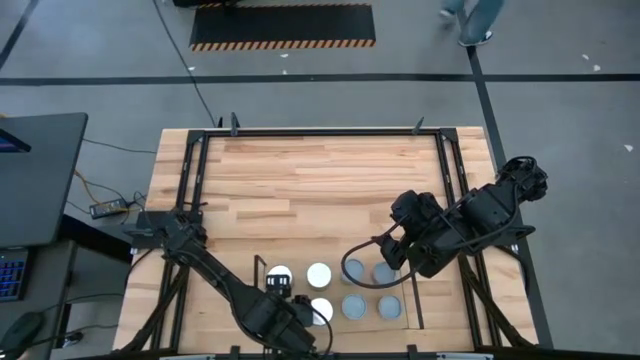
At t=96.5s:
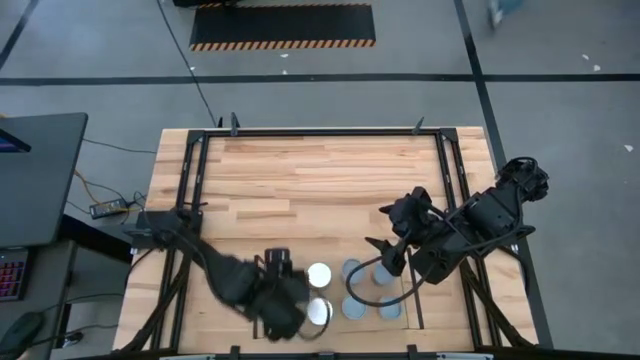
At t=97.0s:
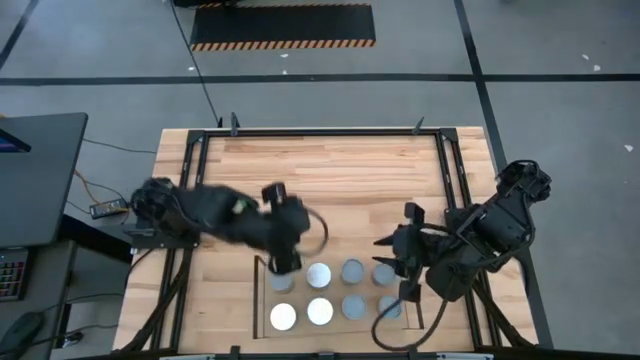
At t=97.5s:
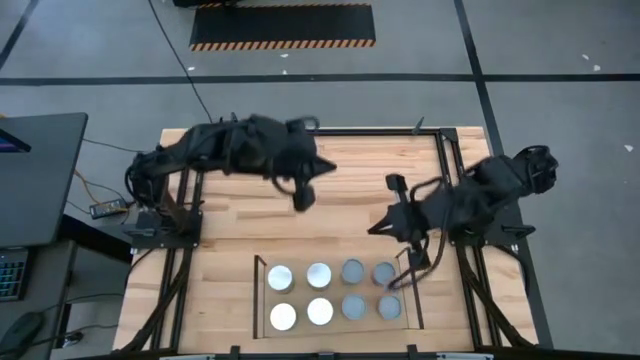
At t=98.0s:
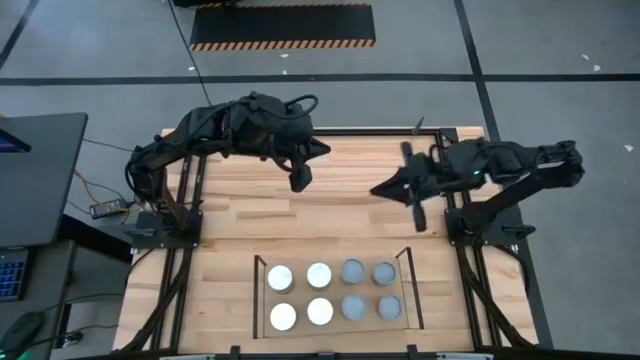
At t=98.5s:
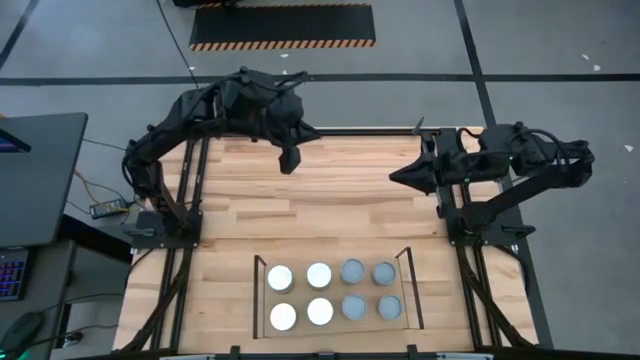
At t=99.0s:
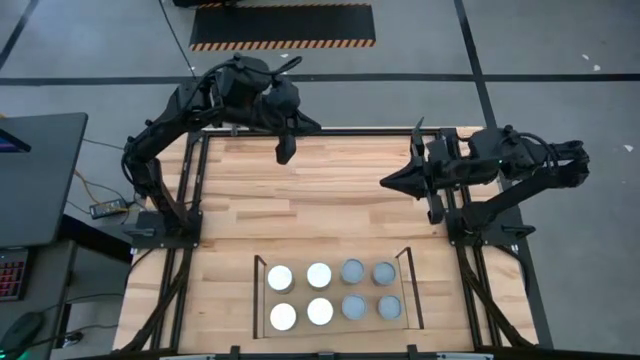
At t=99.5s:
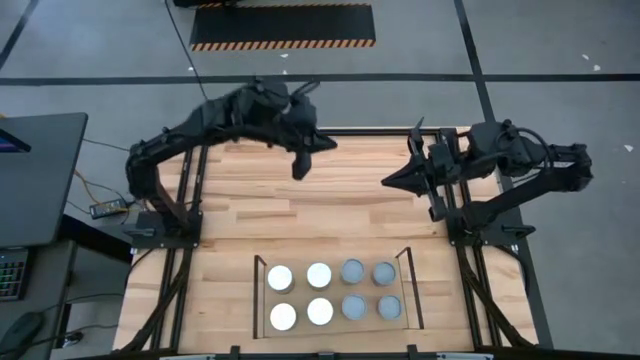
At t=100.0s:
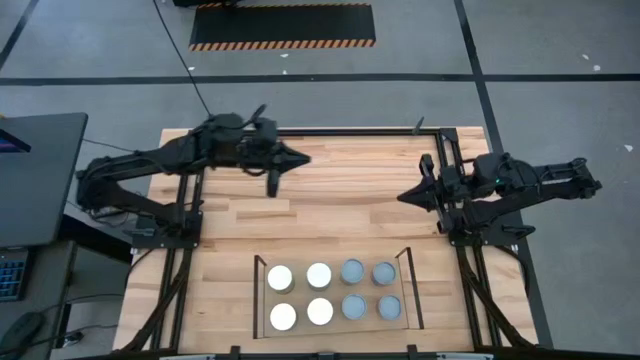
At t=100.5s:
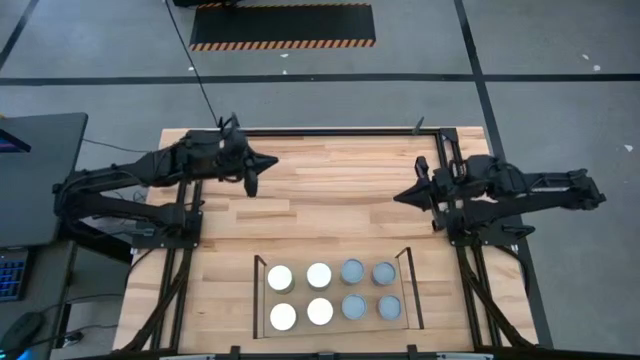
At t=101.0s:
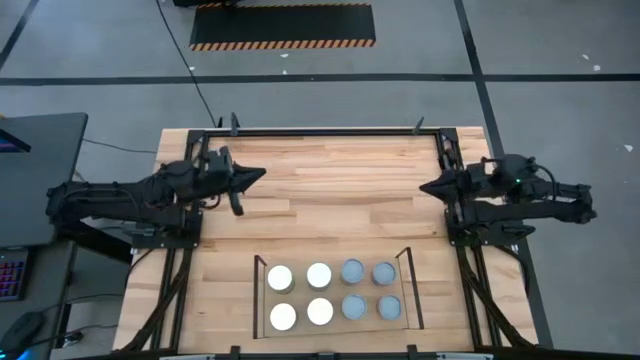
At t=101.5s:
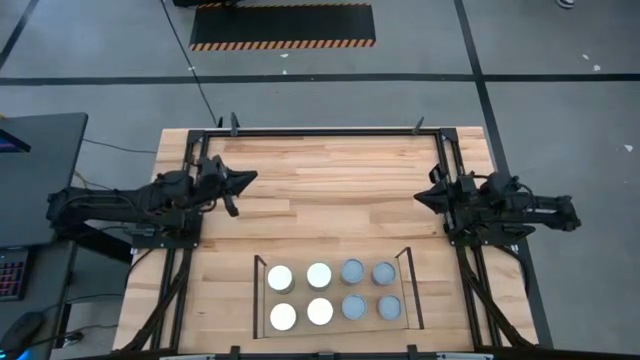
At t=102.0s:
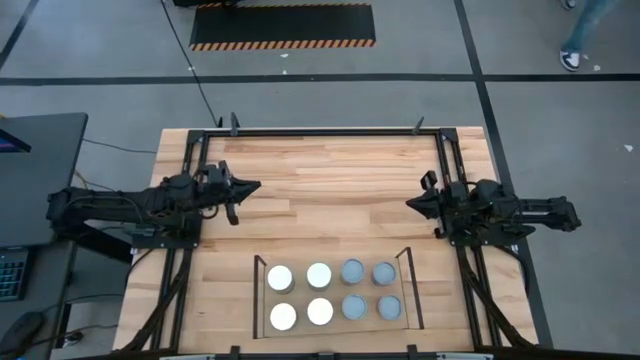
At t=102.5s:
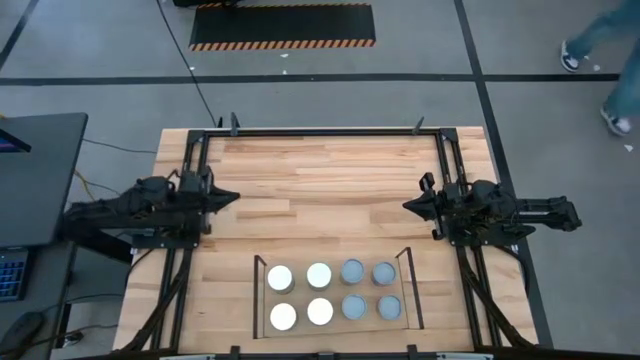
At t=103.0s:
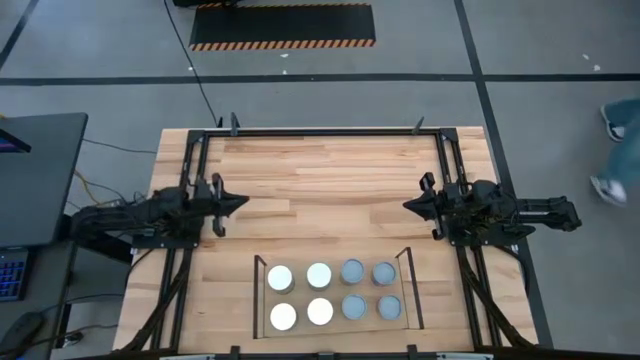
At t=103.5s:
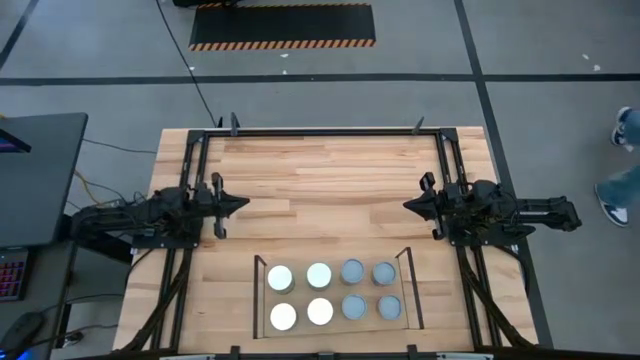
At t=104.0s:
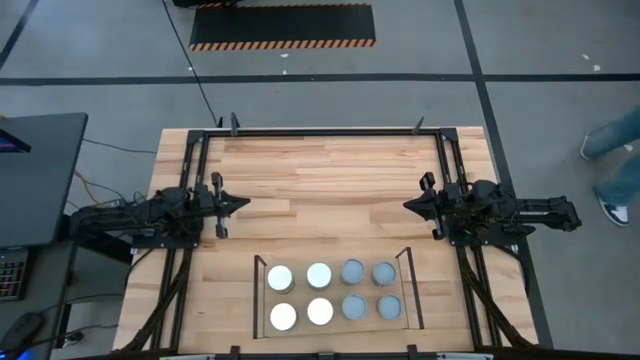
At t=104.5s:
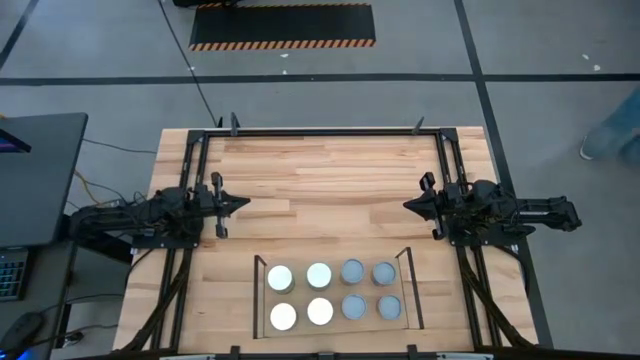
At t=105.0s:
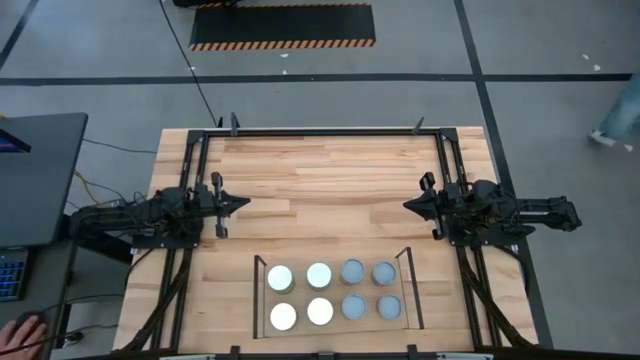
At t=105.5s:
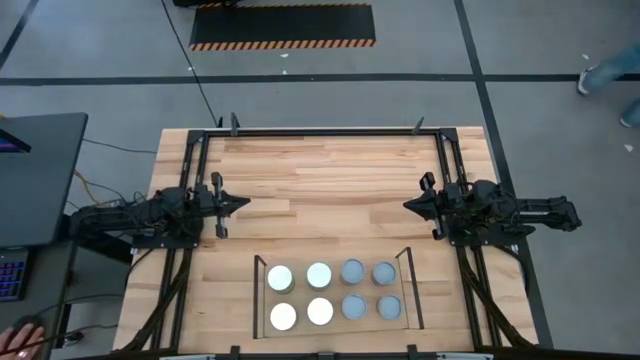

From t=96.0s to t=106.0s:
Task: Pick and place cans onto a shelf
Return to Home Position

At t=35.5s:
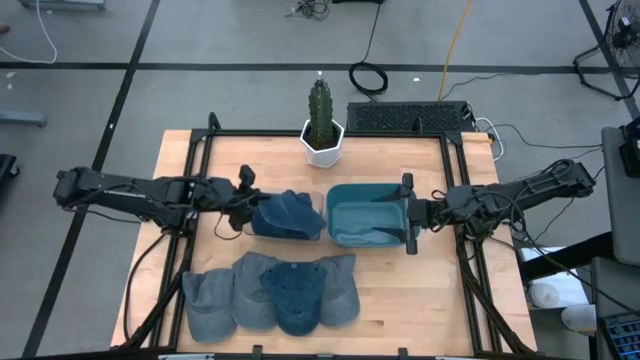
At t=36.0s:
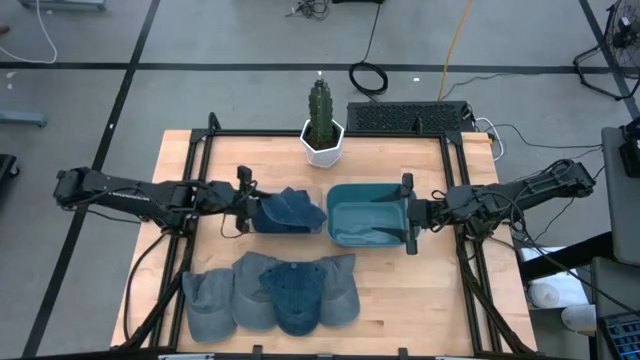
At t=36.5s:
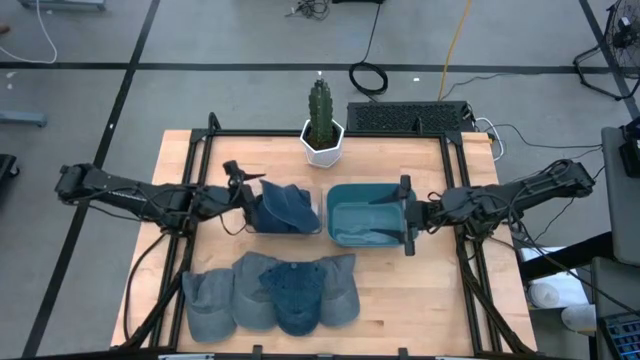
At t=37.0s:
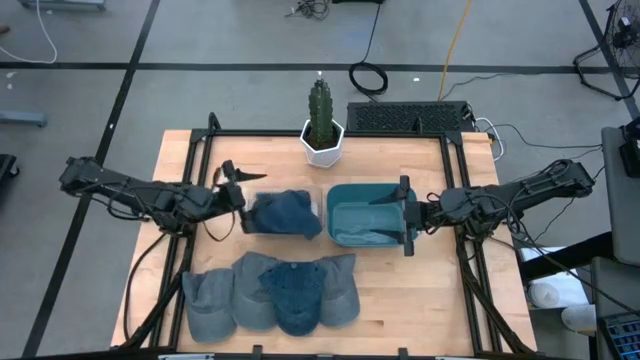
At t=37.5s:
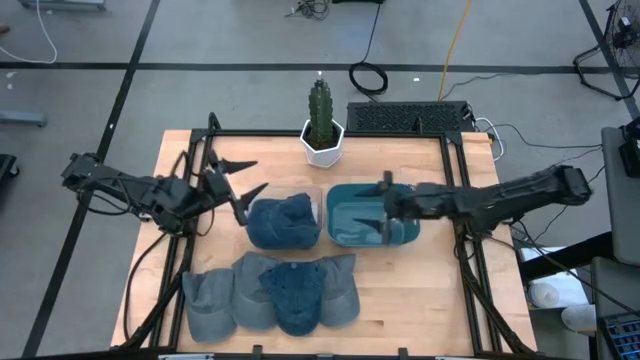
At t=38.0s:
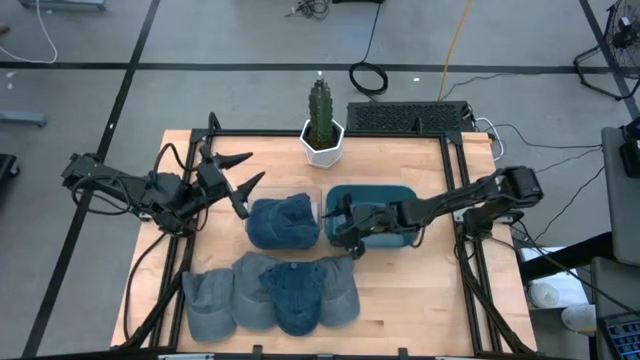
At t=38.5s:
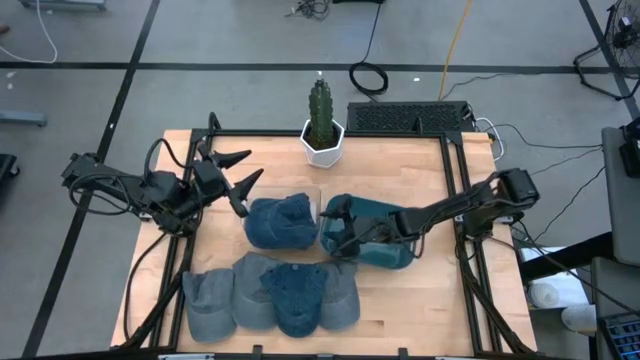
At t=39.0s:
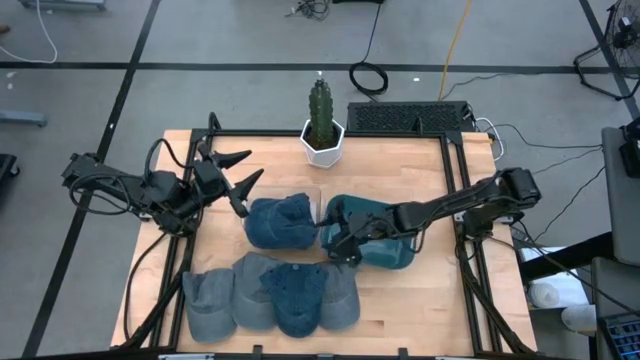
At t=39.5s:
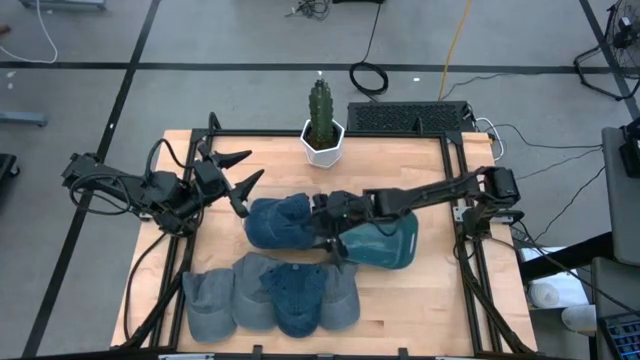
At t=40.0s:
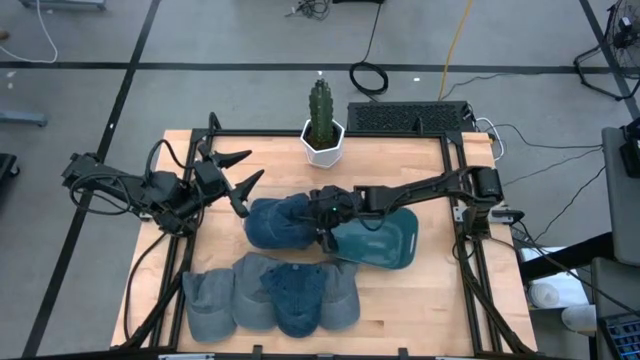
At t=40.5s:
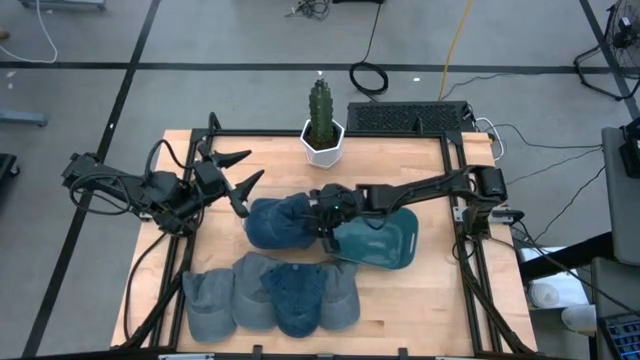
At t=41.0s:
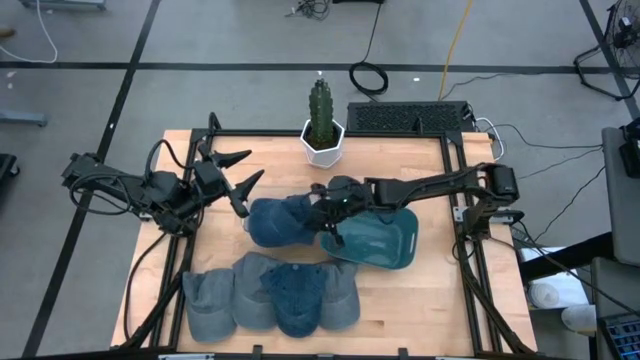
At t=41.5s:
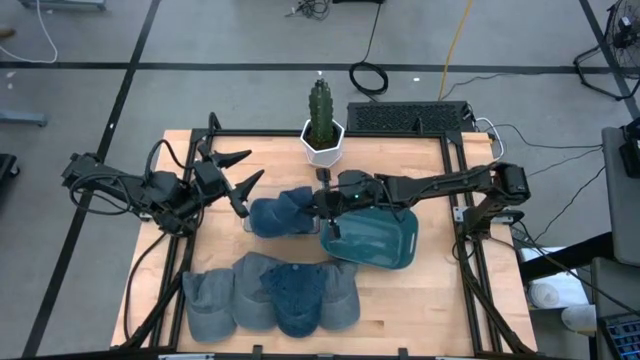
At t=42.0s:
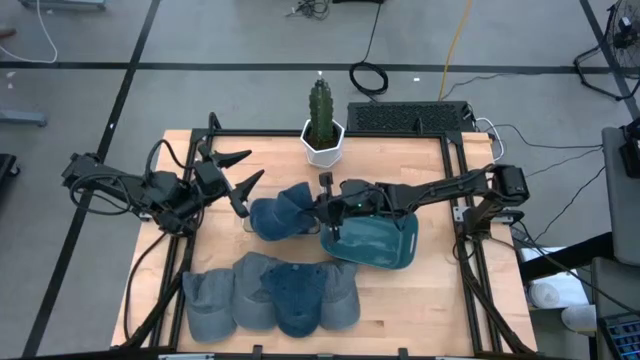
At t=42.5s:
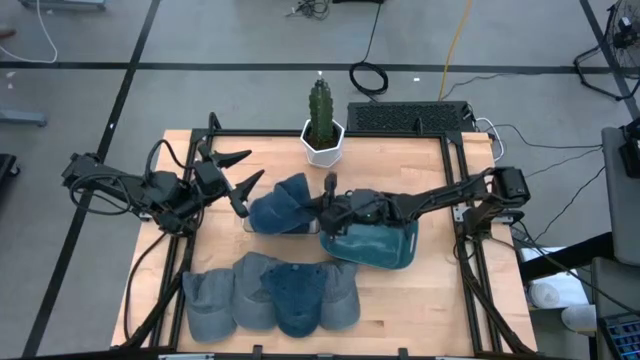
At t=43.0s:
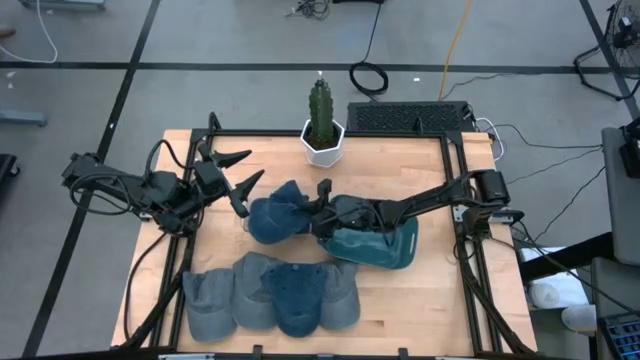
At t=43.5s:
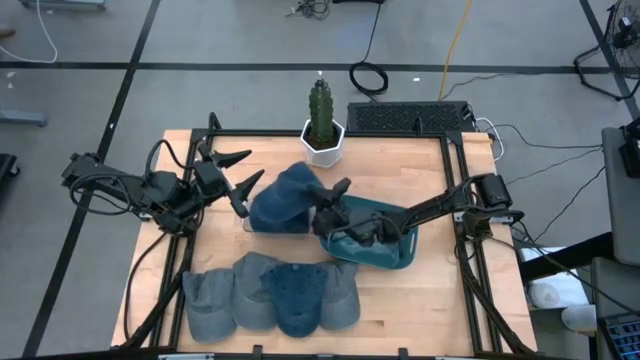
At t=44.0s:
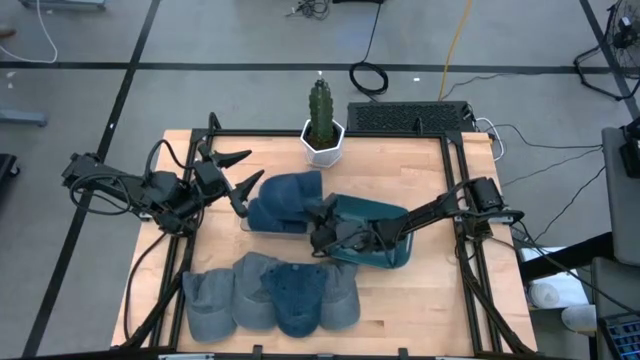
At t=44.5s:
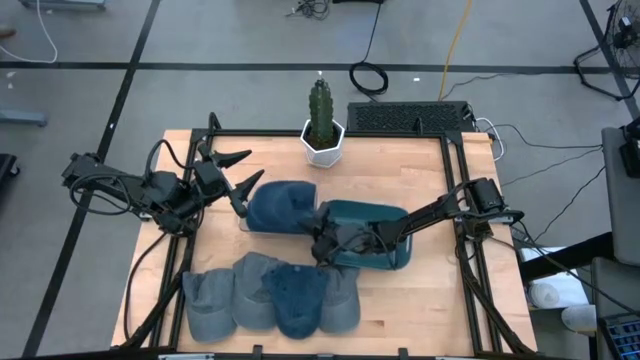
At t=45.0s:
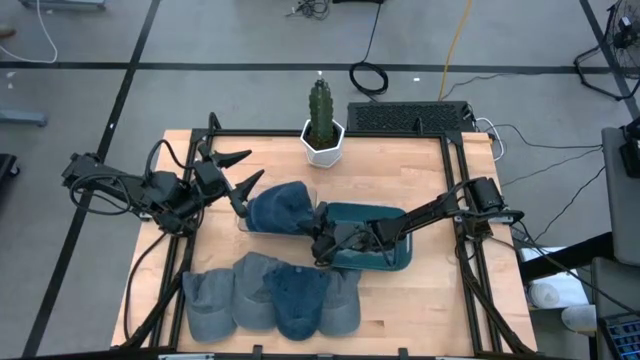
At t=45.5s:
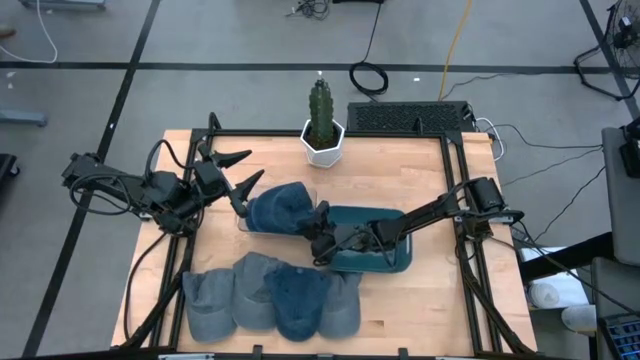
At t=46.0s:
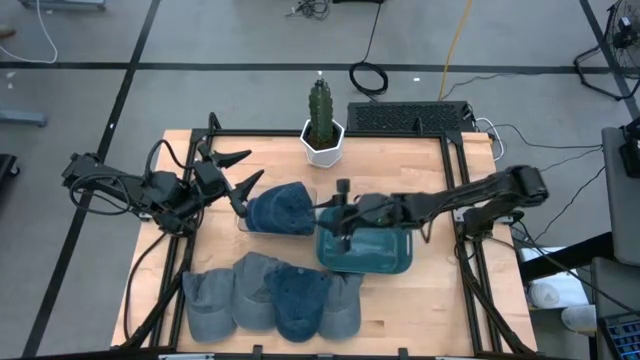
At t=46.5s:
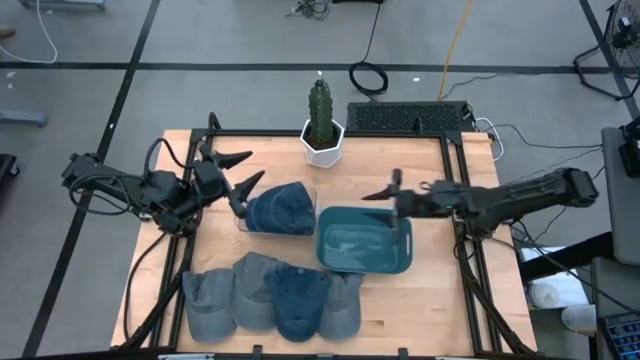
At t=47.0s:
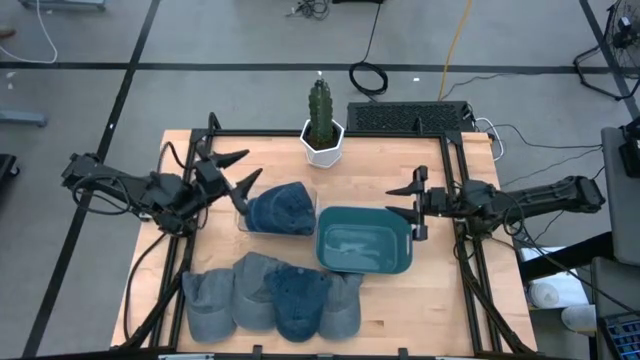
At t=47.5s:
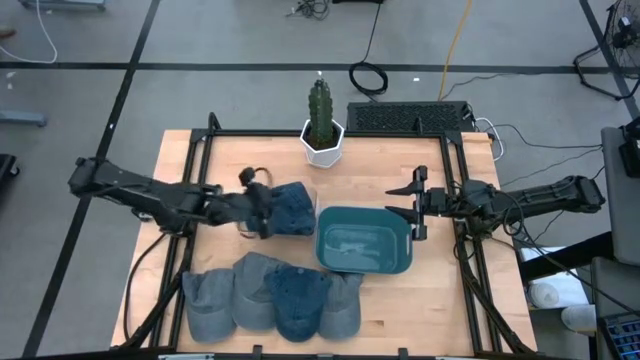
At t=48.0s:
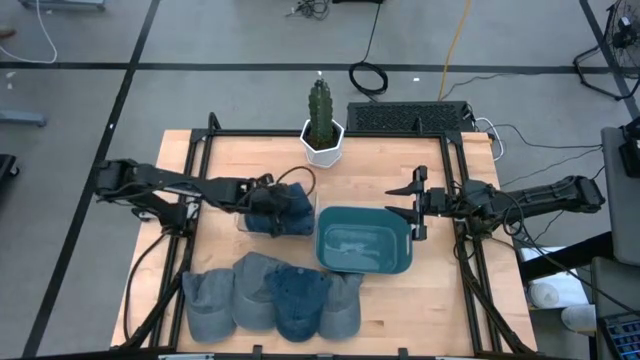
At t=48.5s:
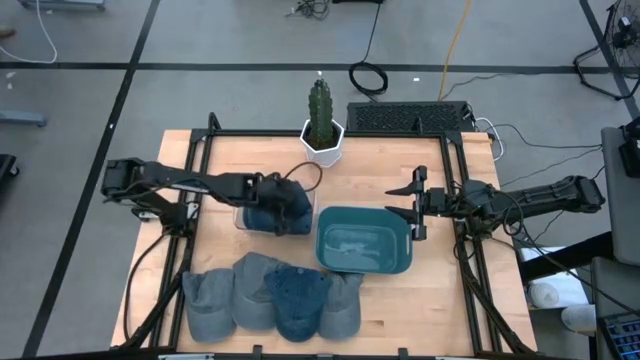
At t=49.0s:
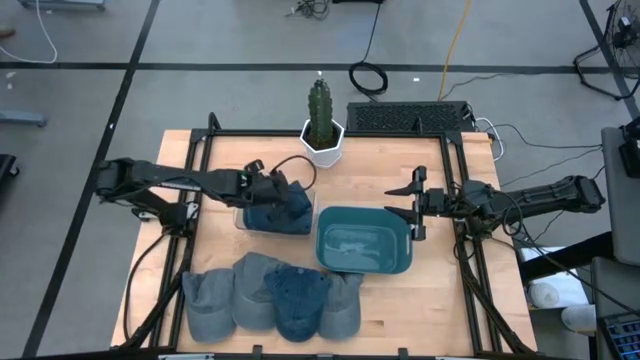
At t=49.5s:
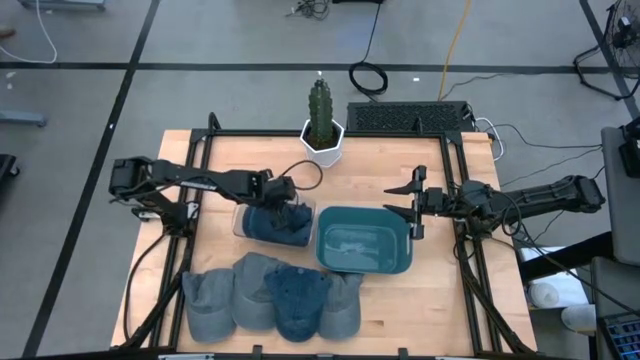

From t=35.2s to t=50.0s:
Task: Pick & Place hat
Put the right blue cap into the transparent bin
